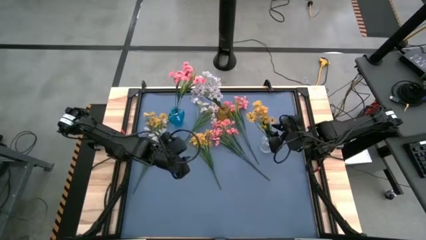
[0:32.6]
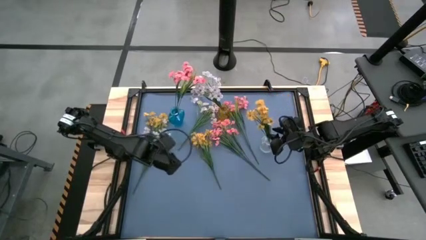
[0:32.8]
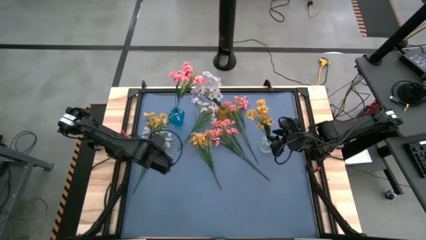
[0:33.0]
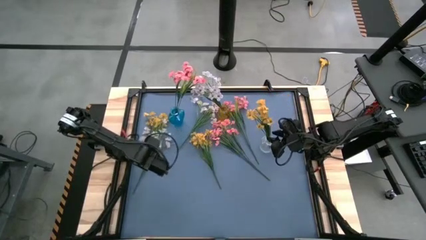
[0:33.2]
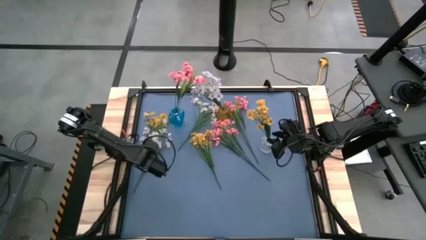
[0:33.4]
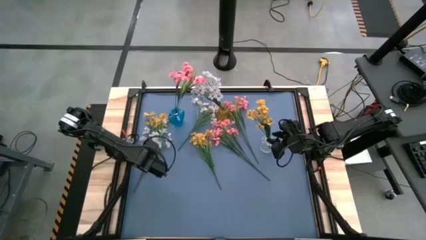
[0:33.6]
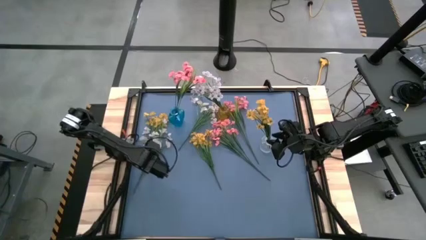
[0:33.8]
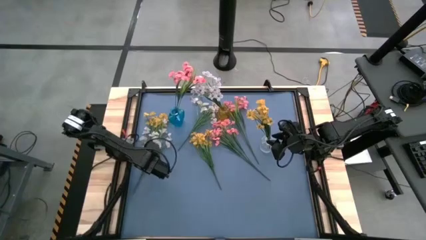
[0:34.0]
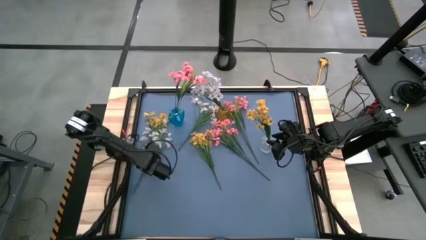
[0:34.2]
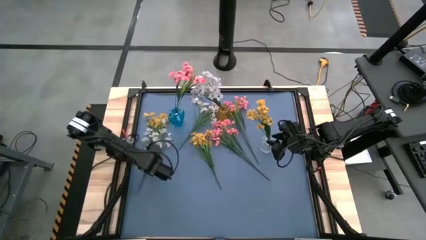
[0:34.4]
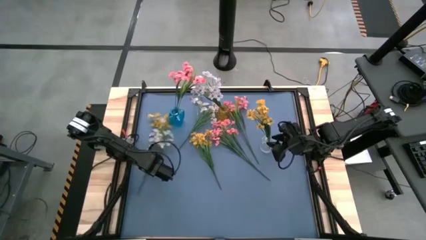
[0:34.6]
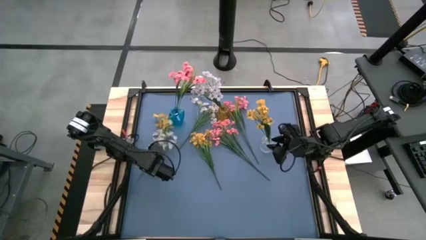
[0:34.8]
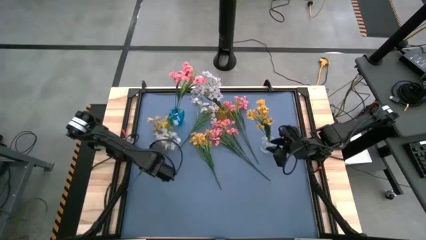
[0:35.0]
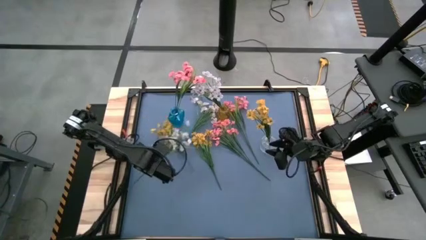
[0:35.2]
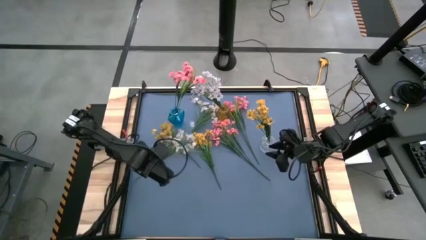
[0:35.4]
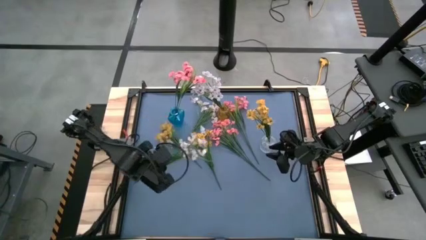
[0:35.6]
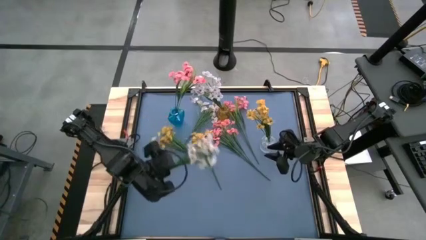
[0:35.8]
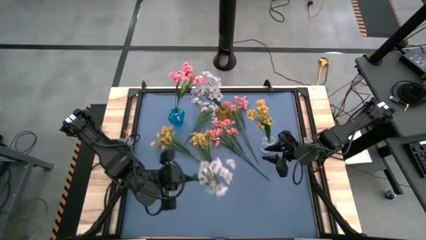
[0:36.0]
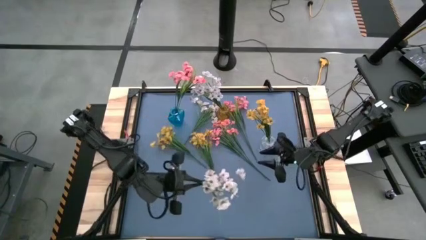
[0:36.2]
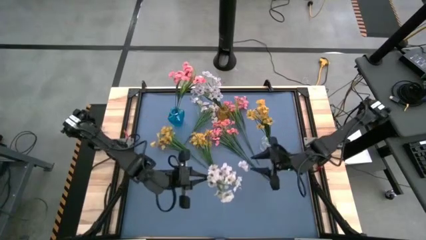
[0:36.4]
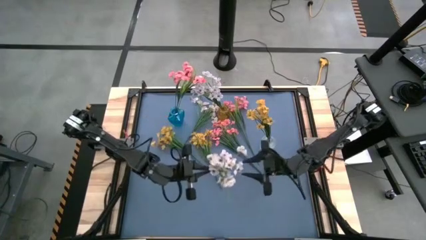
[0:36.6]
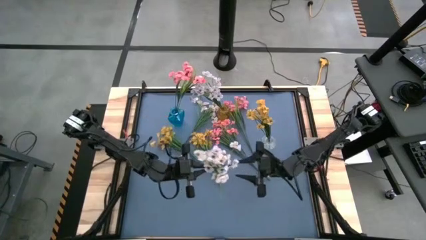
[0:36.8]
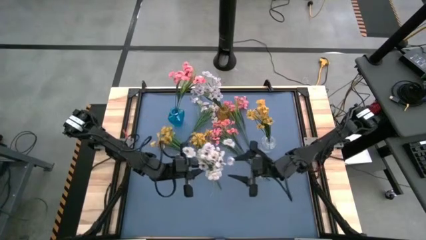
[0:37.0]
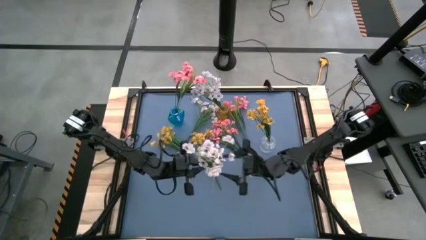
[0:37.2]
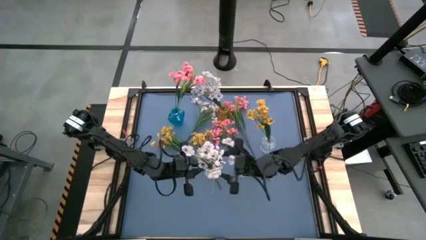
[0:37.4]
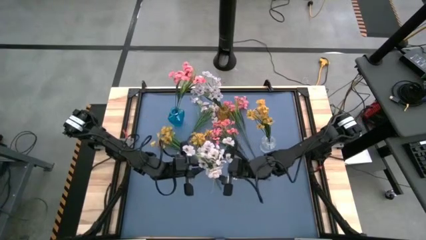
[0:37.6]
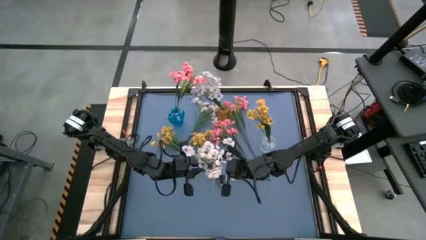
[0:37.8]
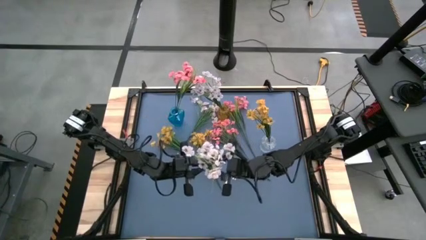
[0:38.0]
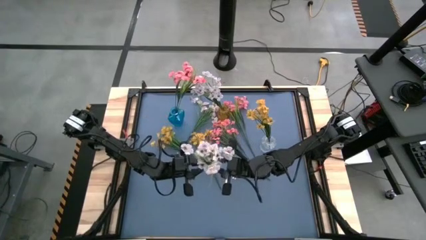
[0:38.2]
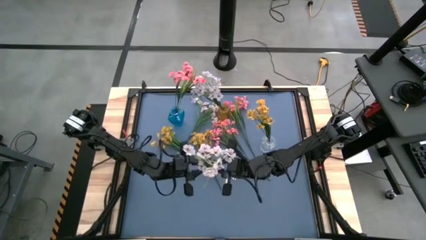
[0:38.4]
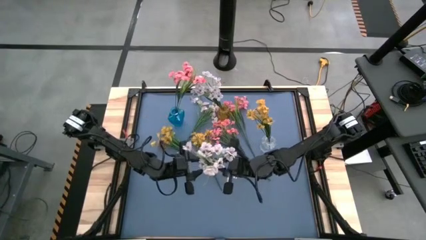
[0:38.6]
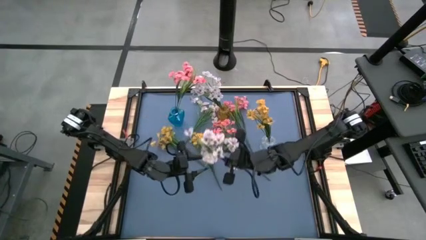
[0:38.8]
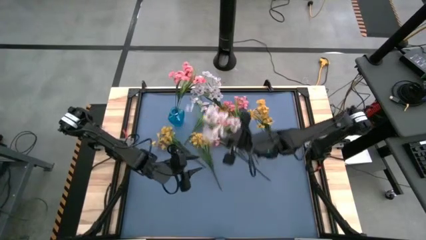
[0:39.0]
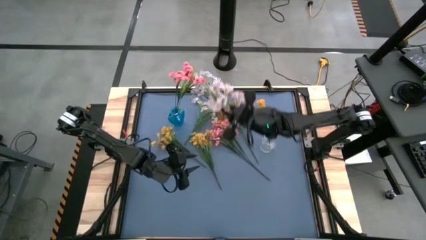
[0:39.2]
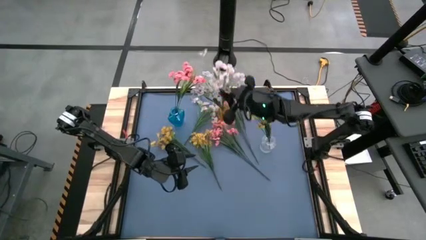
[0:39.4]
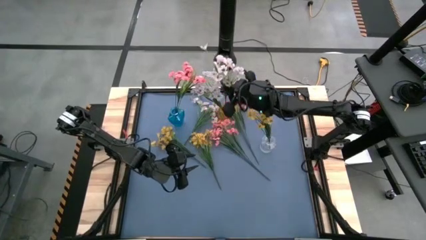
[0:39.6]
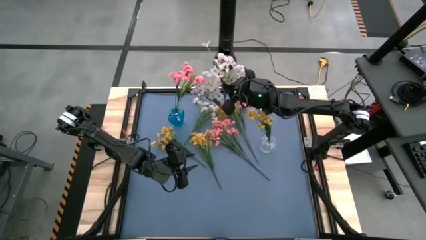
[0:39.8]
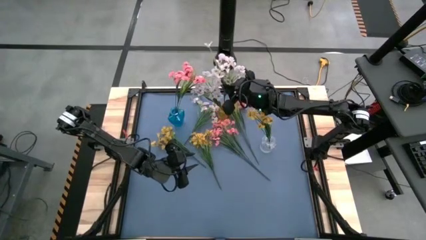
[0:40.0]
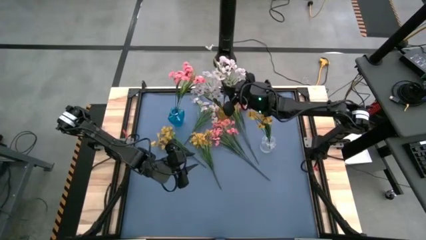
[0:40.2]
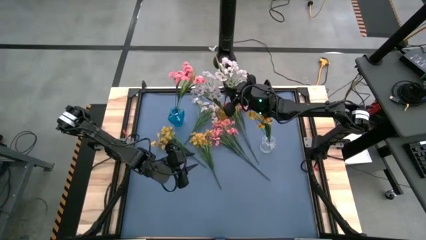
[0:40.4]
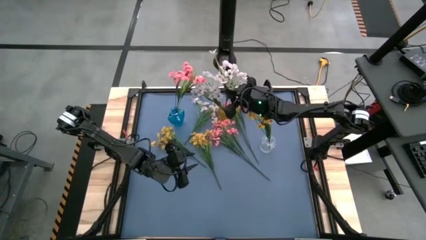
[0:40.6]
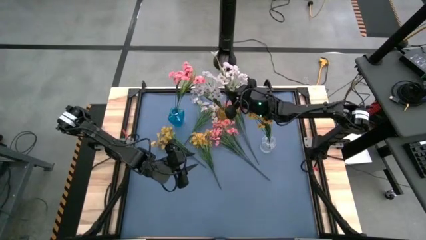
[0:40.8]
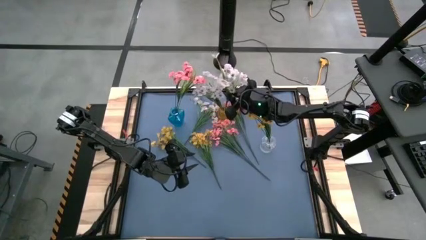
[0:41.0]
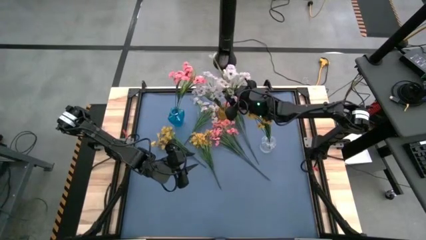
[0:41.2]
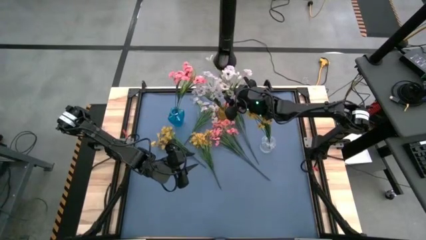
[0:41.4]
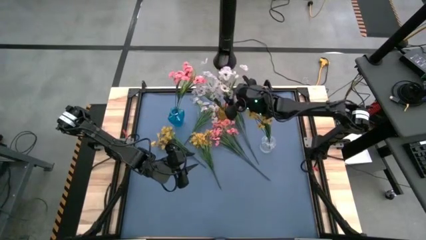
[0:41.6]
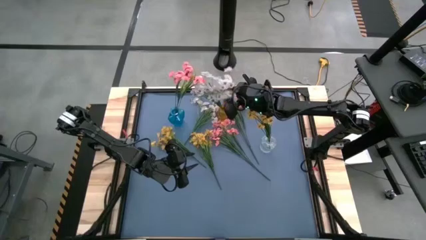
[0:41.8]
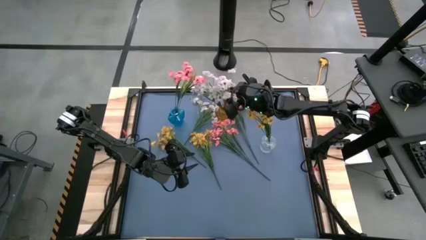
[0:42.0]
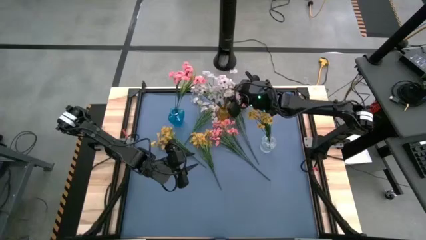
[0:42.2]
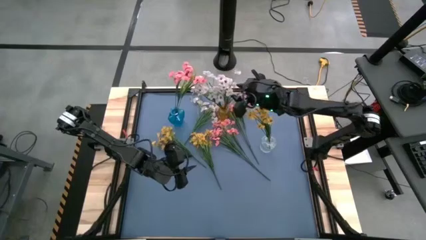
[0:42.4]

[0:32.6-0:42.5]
Task: Sort flowers into vase by color
Put the bottom white flowers into the yellow vase

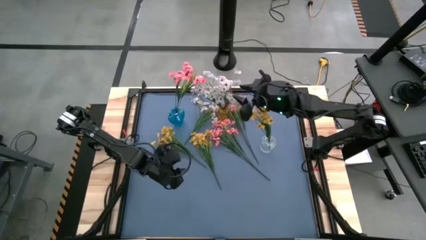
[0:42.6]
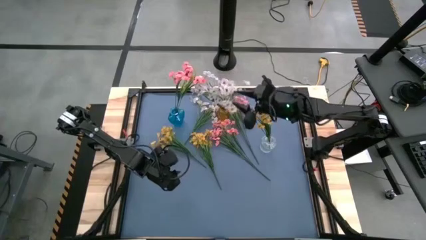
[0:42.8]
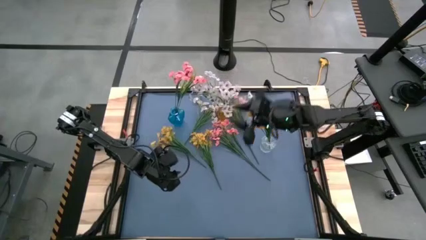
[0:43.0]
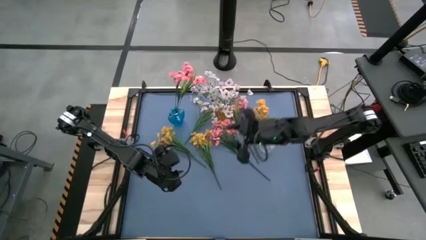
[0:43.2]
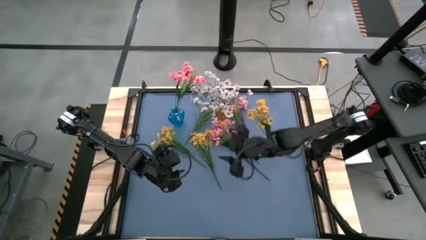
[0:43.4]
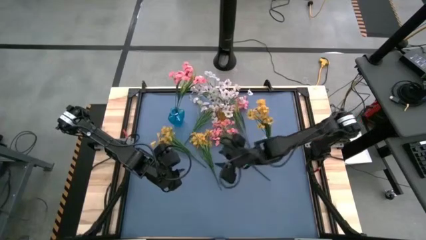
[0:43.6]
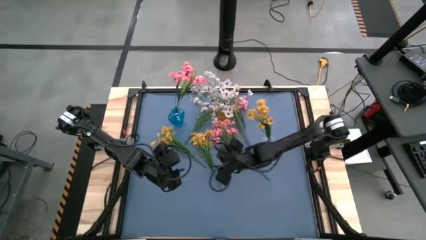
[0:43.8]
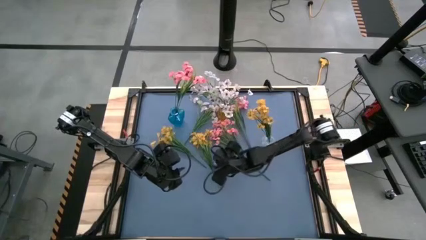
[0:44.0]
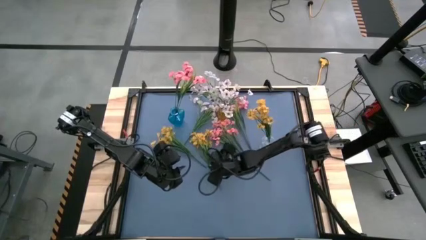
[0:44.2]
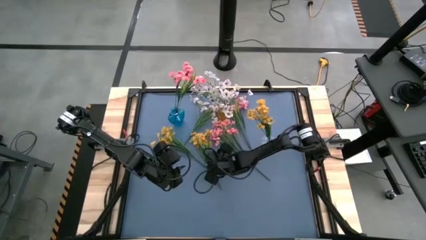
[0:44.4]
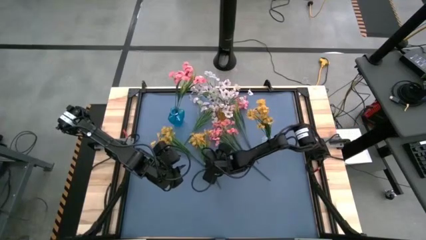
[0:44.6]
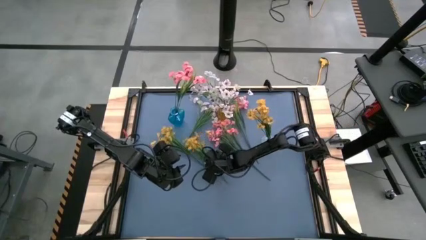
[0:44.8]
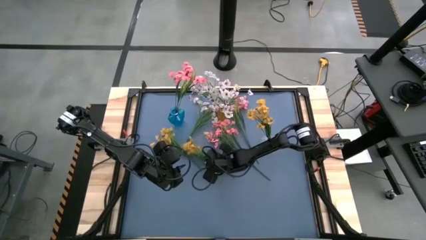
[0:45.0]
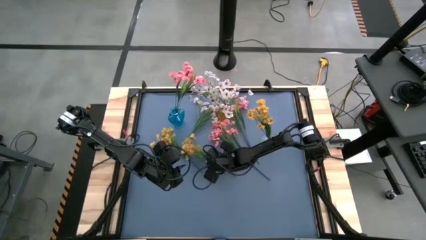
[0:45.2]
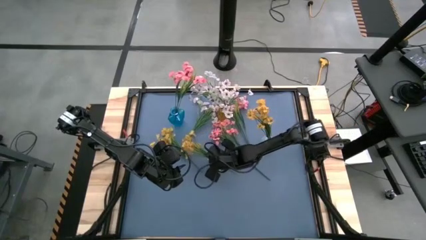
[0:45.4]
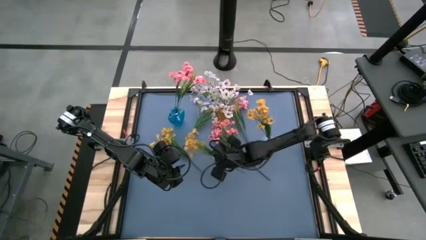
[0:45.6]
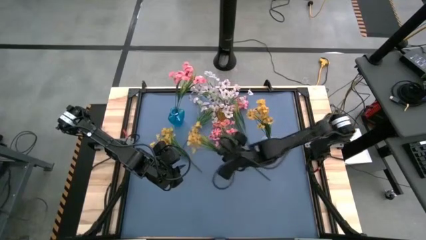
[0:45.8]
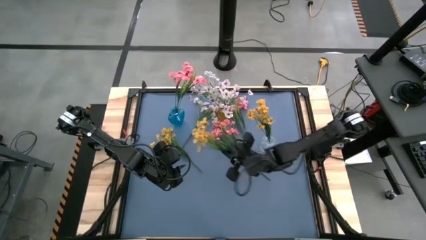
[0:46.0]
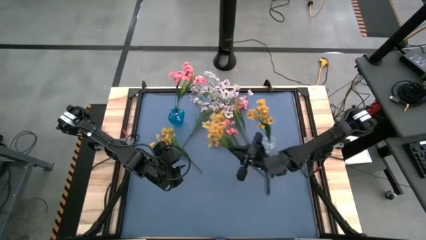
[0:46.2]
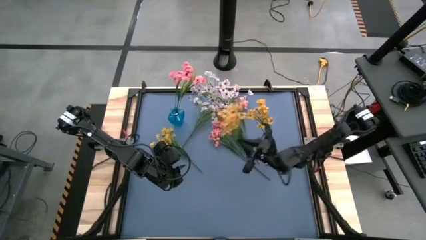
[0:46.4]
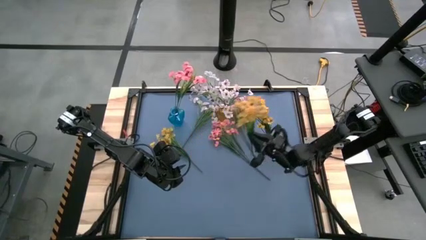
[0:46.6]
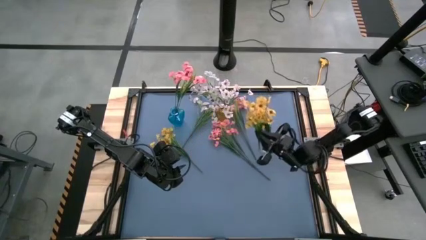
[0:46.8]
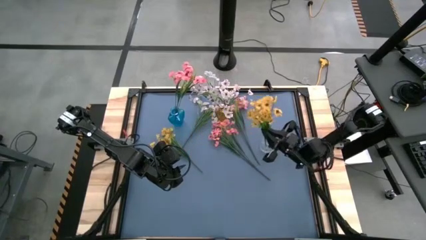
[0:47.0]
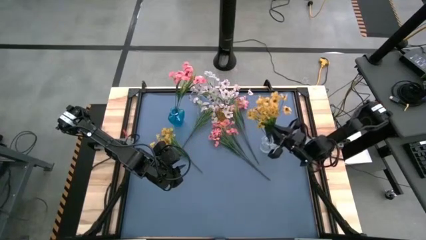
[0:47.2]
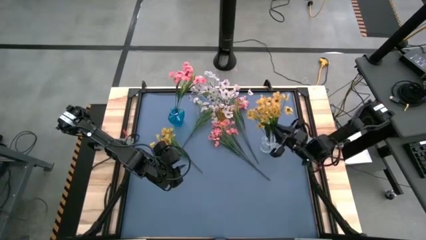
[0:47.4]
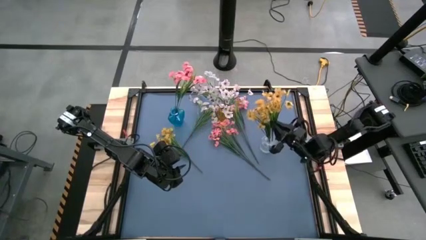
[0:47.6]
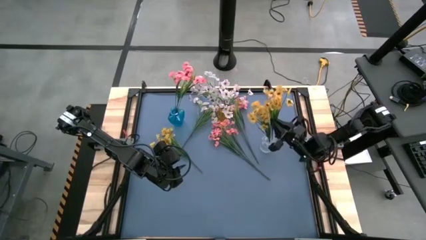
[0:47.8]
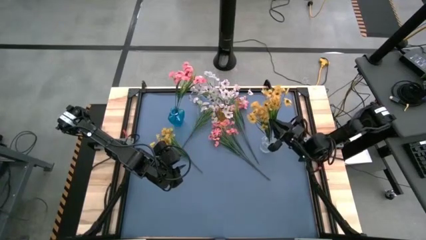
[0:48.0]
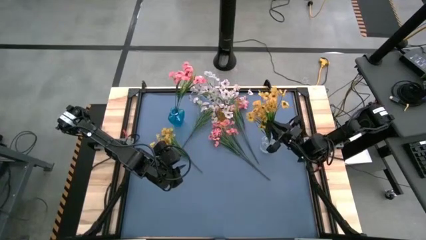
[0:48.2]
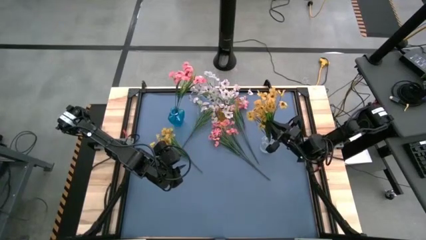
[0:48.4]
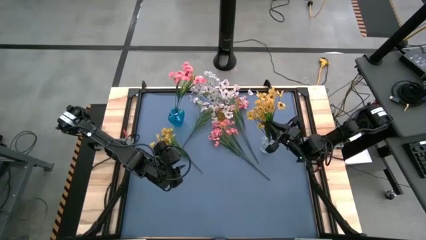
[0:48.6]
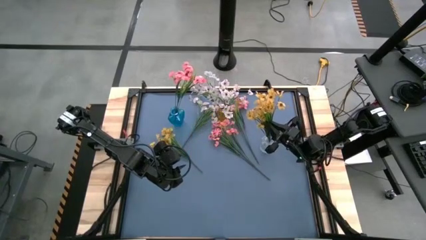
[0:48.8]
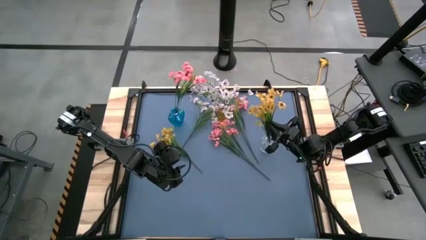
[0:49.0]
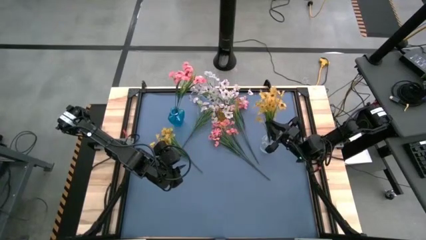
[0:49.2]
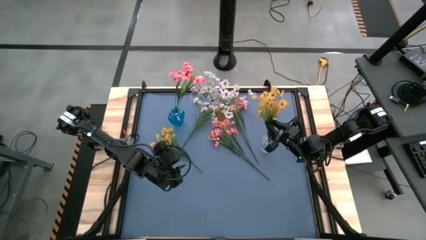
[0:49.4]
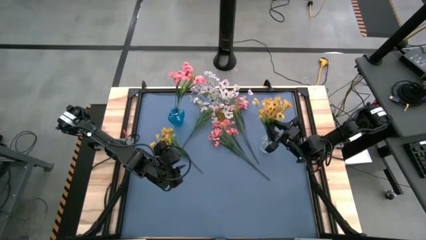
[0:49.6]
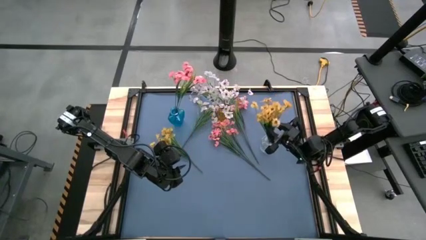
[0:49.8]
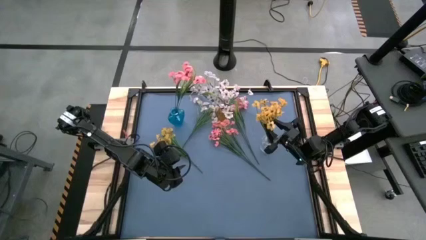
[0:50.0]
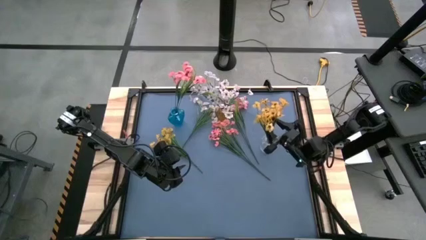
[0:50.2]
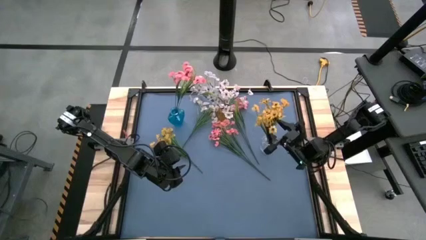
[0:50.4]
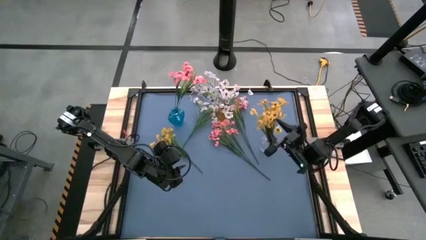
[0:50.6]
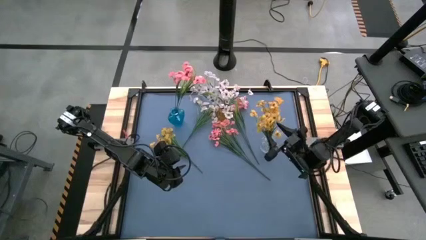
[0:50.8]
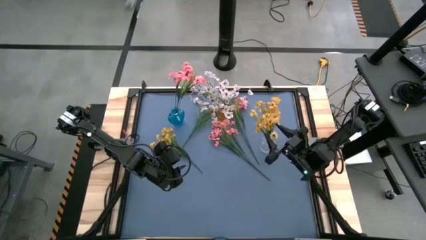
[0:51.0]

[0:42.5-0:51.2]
Put the right yellow flowers into the transparent vase
